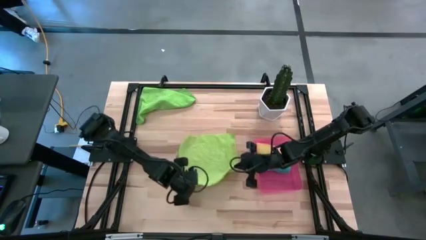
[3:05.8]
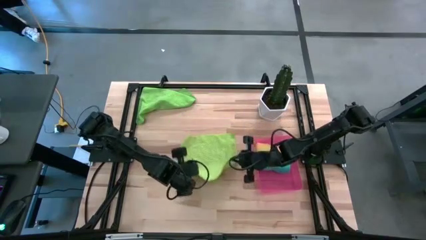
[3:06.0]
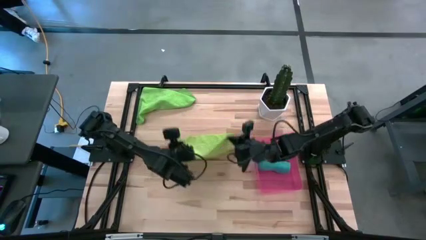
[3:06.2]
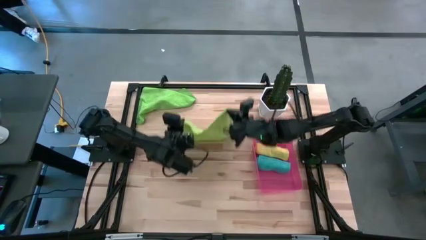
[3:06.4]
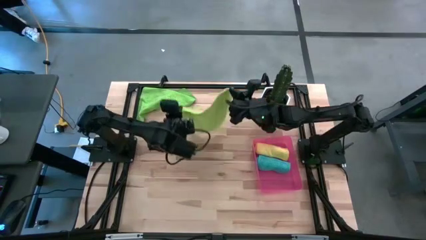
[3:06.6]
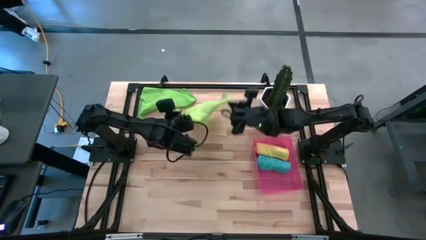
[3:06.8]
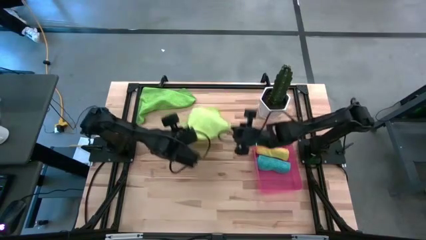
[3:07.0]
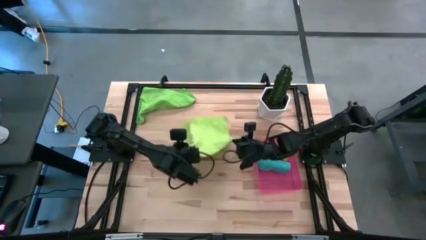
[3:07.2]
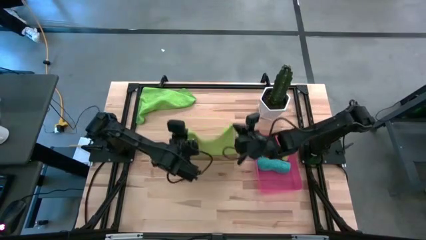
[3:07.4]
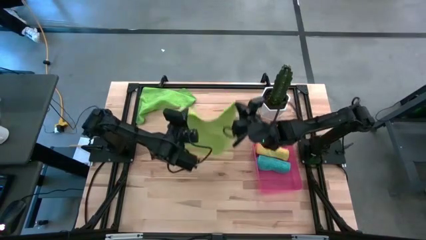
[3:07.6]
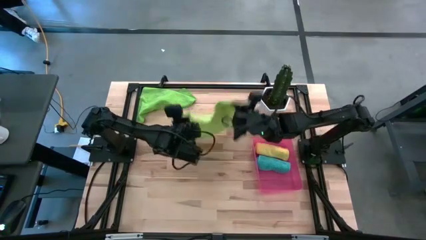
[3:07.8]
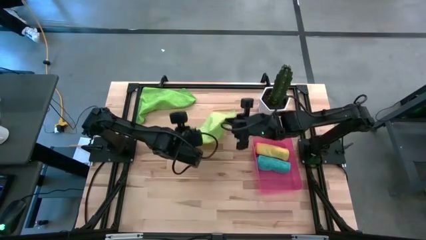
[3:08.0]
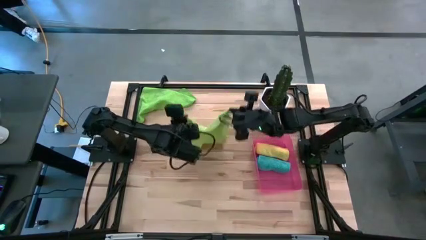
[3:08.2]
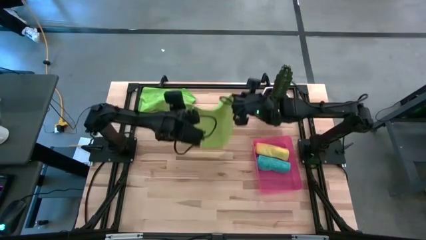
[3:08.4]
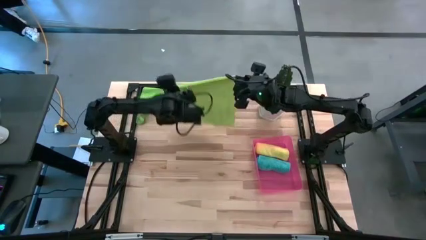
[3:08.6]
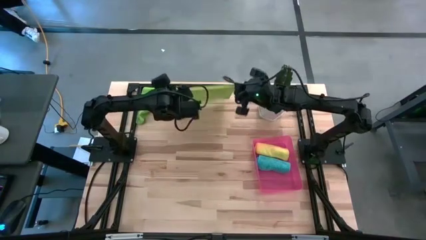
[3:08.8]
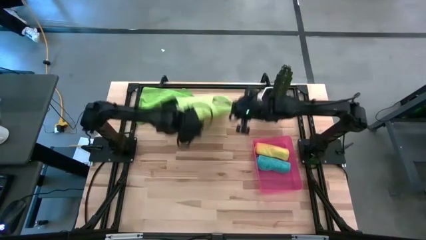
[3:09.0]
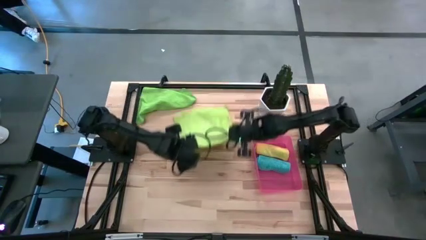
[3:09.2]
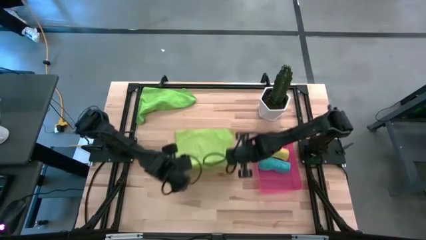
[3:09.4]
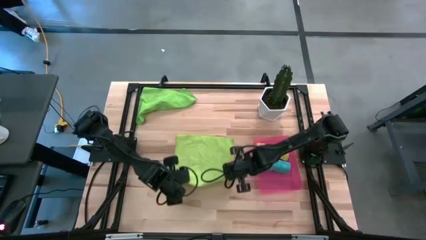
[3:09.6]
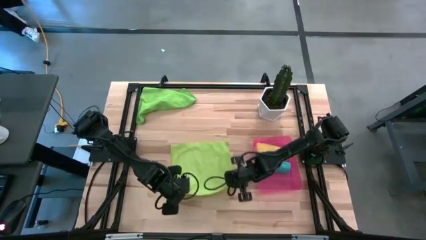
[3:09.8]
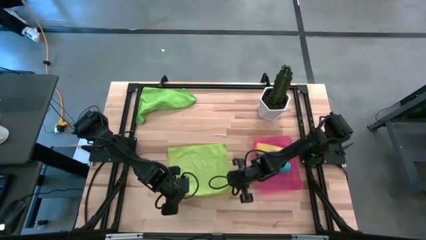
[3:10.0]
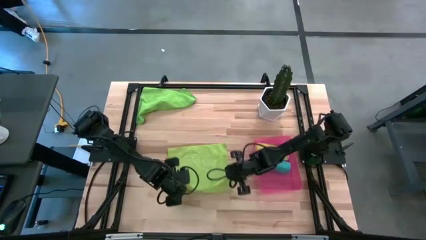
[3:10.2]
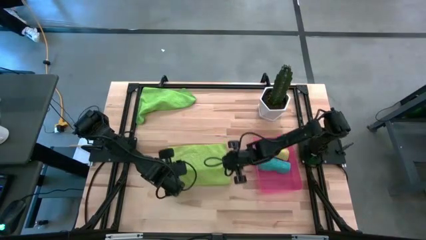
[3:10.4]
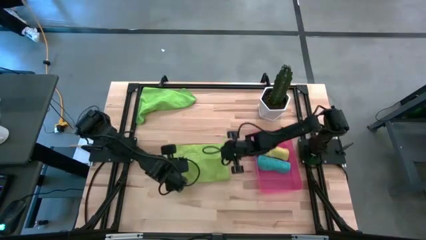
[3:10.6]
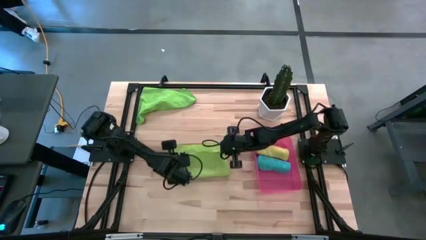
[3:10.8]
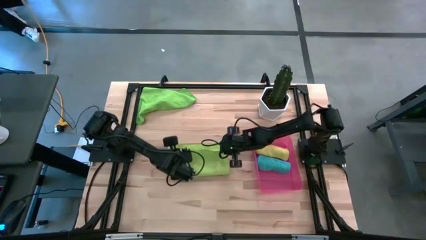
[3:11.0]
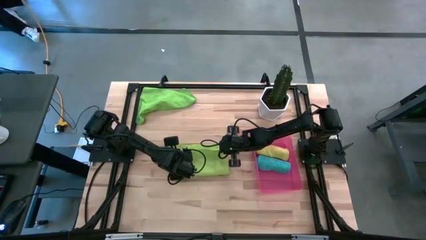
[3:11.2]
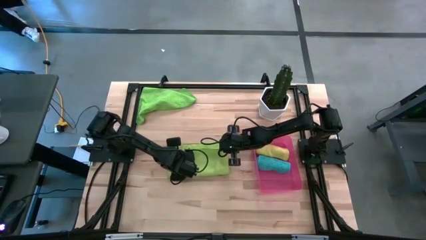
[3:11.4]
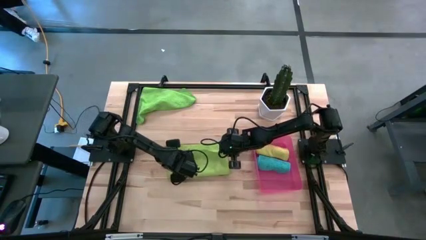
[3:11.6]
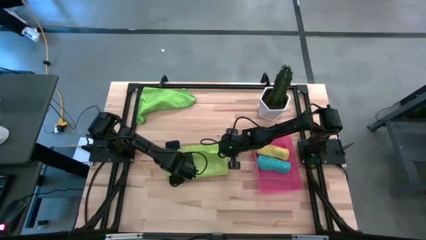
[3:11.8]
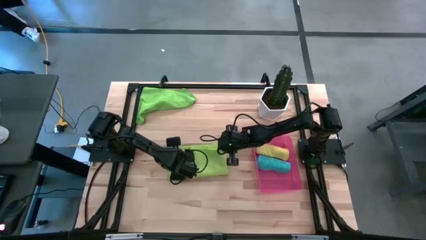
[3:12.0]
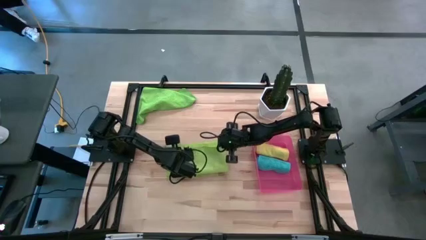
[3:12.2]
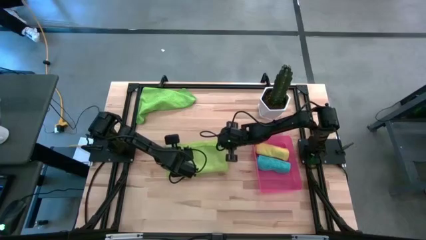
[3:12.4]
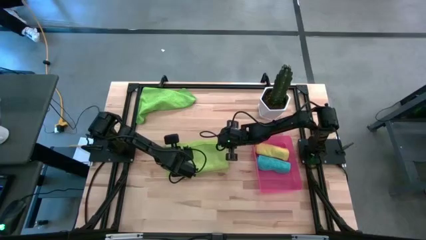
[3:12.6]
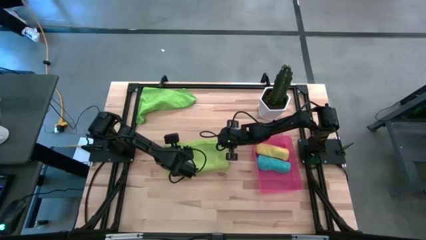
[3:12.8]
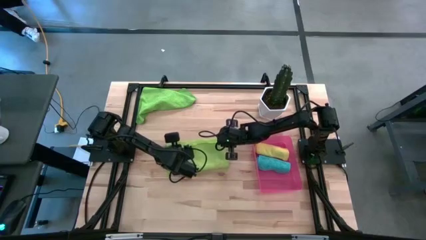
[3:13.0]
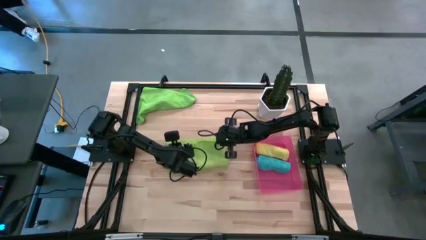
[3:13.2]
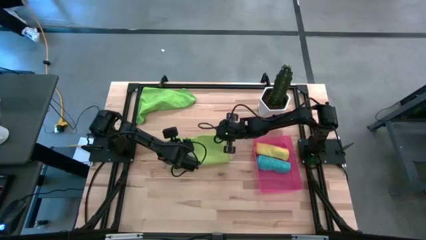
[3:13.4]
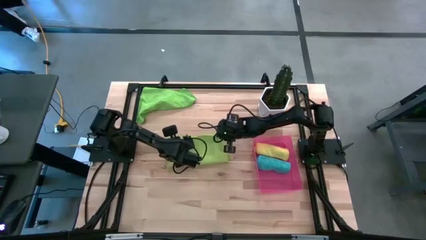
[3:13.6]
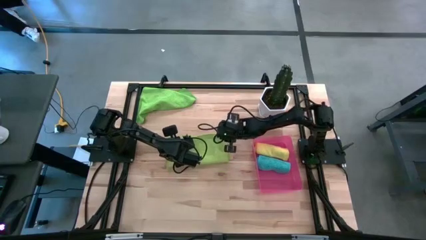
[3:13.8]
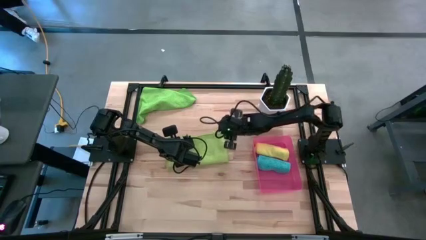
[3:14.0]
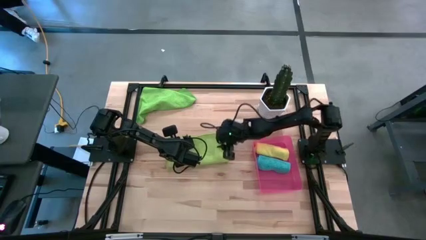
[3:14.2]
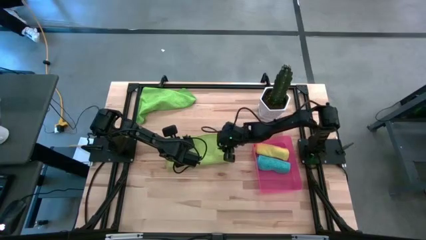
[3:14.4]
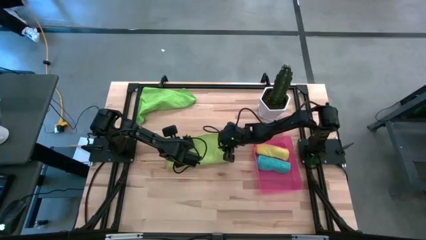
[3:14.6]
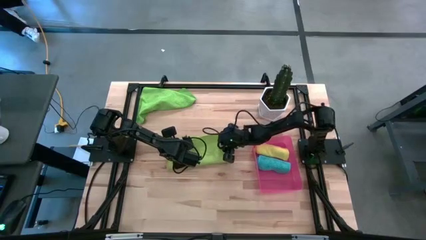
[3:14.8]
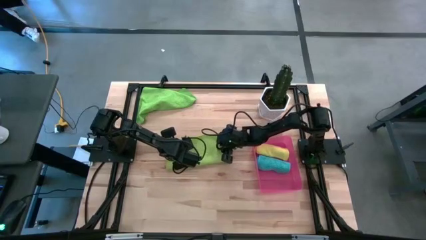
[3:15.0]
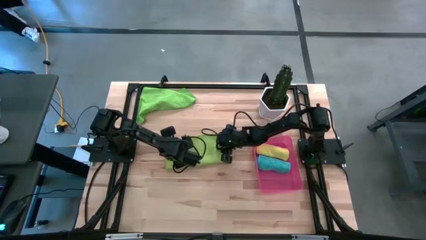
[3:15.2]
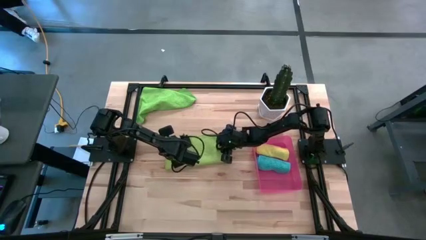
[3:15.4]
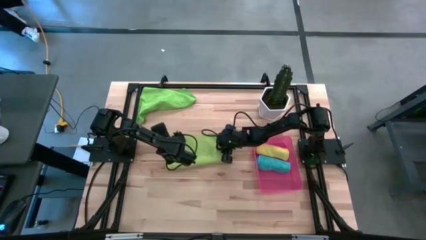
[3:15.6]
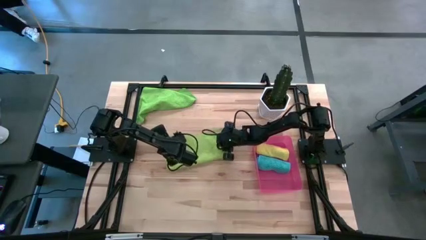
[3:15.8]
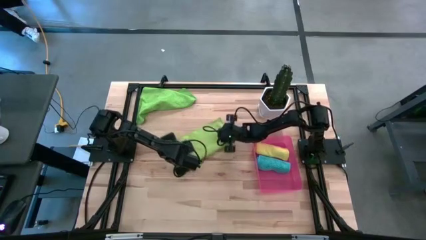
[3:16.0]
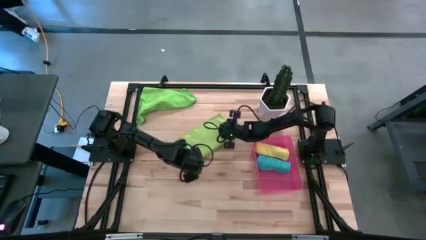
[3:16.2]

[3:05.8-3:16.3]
Task: Roll microfiber towels into tight, uniform cylinder then place into a basket
Fold the bottom light green microfiber towel

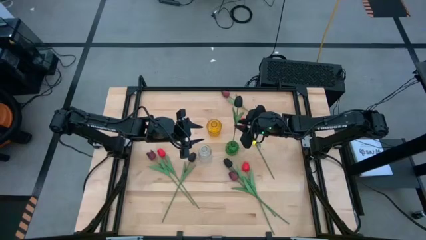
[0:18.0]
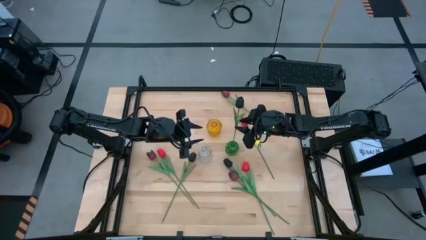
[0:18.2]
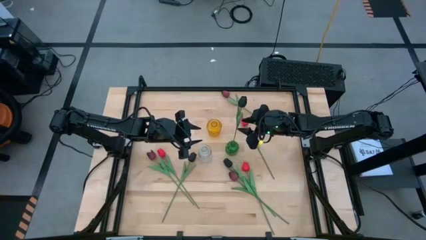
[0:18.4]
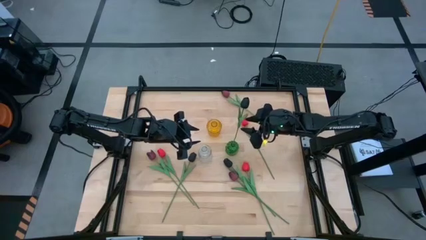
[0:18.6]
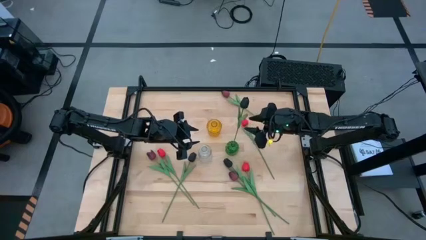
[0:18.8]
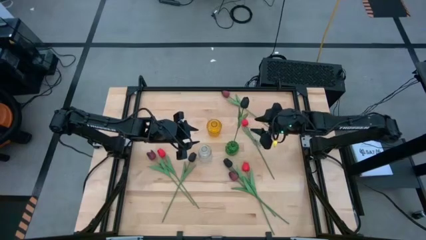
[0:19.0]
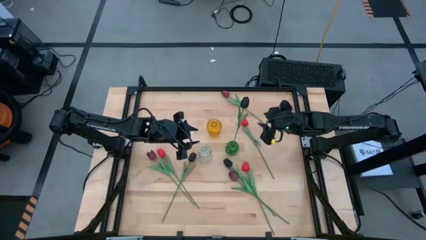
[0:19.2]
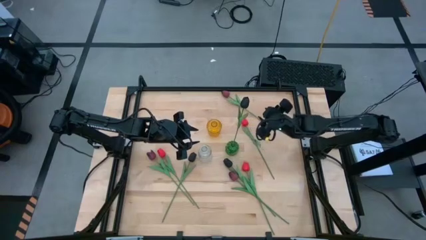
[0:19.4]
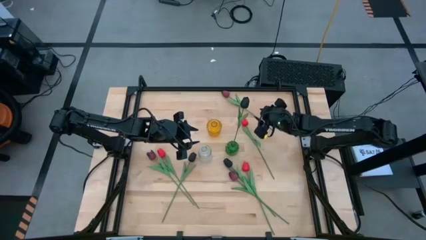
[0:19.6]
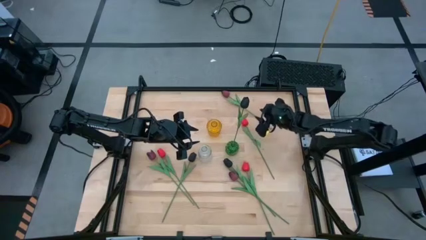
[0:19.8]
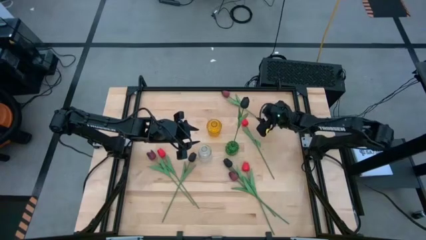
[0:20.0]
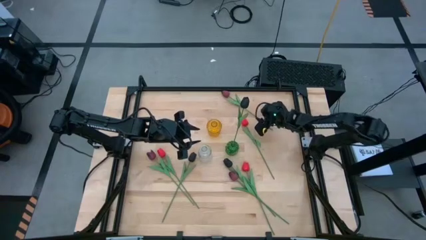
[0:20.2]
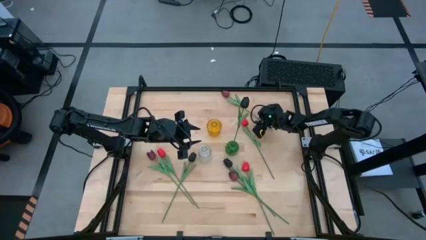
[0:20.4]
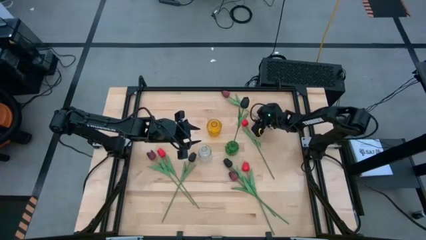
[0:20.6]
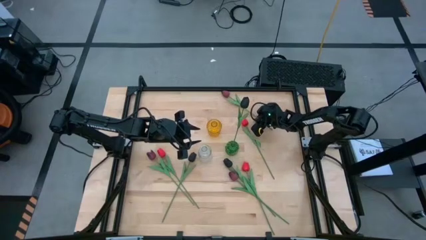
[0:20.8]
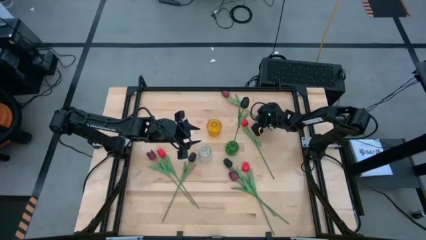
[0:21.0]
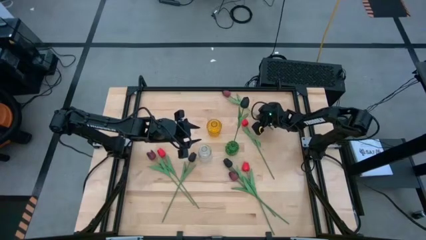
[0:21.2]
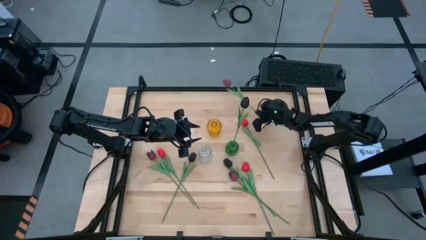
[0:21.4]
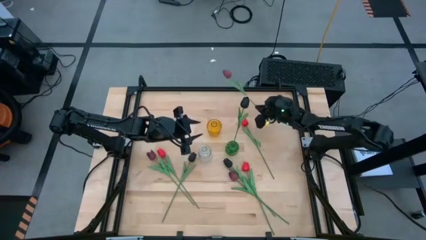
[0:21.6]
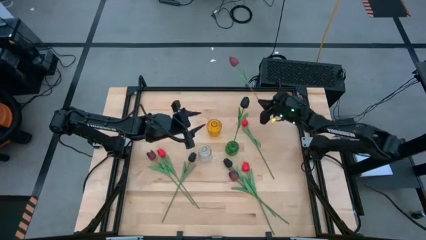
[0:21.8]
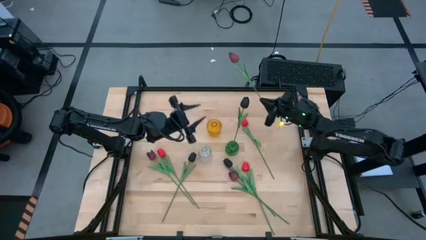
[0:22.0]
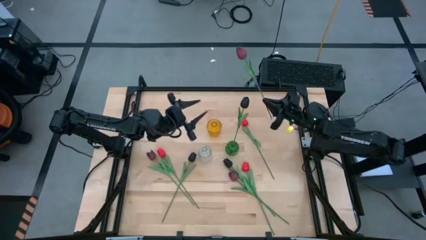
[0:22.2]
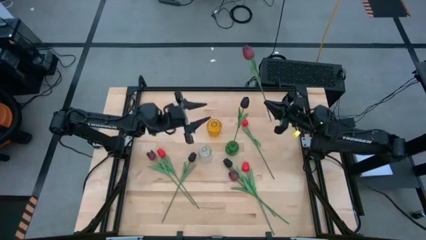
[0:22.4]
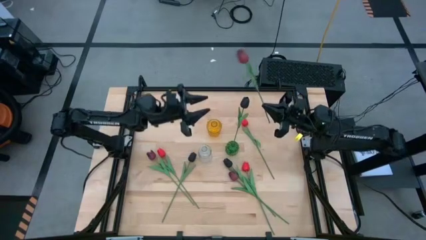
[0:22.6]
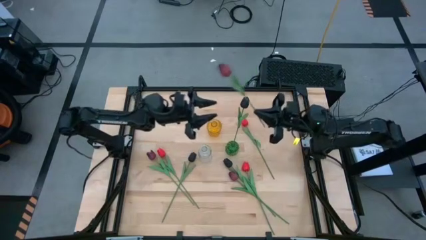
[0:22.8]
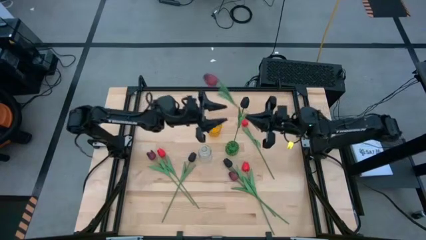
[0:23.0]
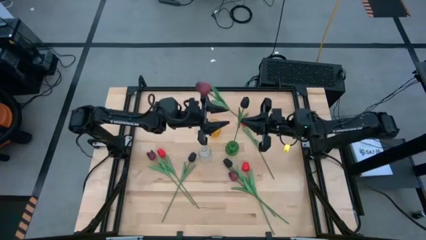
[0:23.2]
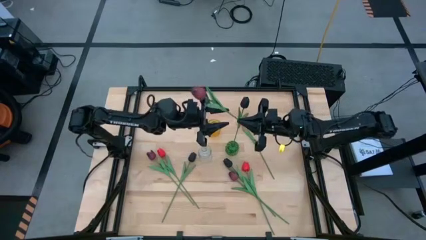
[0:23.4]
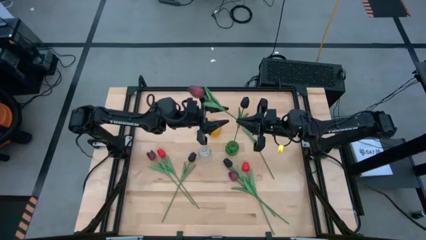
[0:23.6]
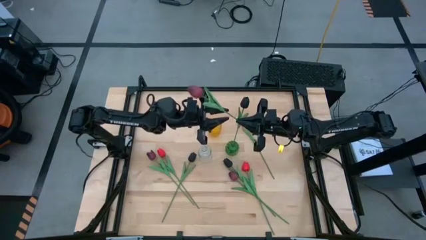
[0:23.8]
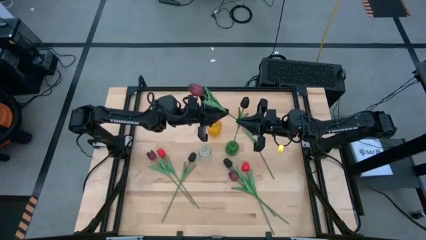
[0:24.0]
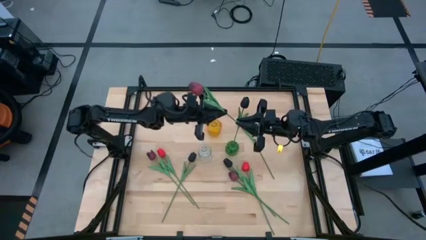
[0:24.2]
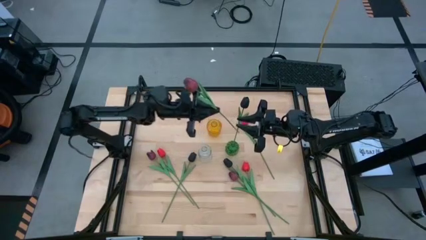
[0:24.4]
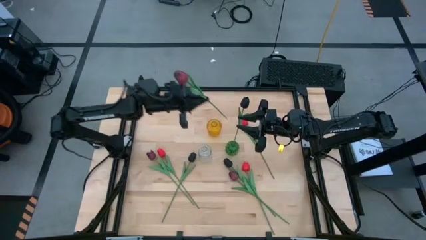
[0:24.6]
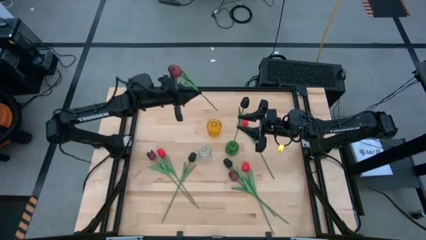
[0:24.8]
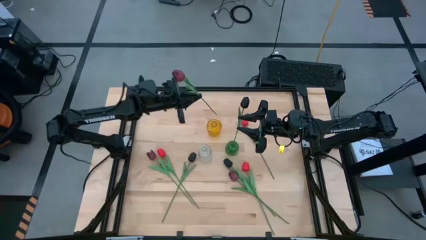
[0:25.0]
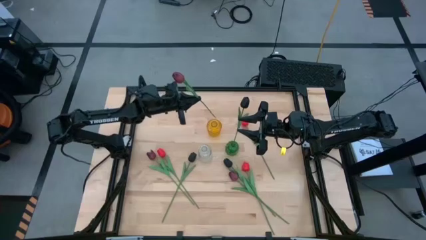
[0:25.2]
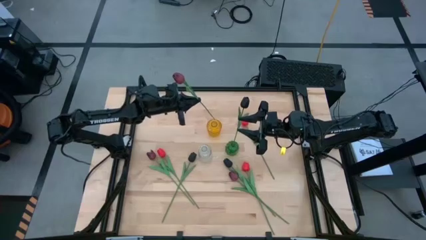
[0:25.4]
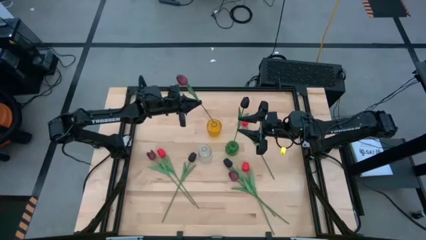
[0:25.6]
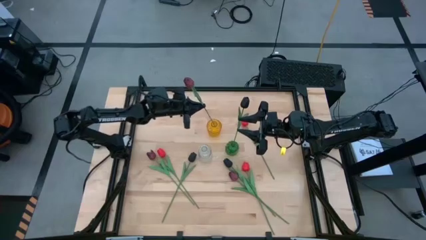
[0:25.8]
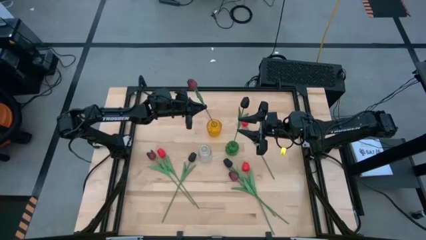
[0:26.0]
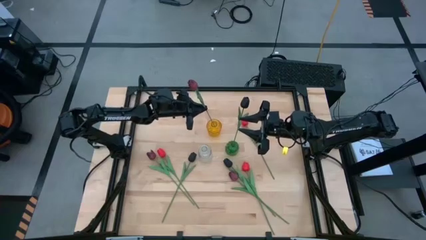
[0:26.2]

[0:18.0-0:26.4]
Task: Sort flowers into vase by color
Put the top right pink flower in the yellow flower vase
